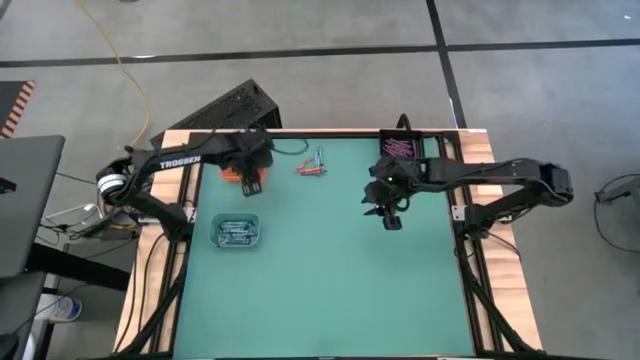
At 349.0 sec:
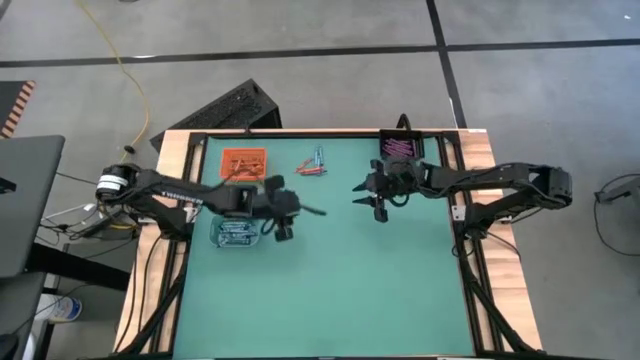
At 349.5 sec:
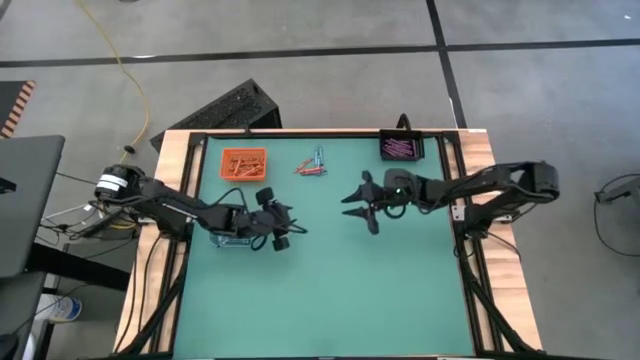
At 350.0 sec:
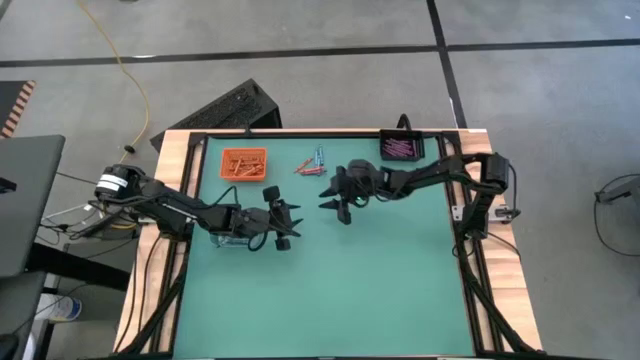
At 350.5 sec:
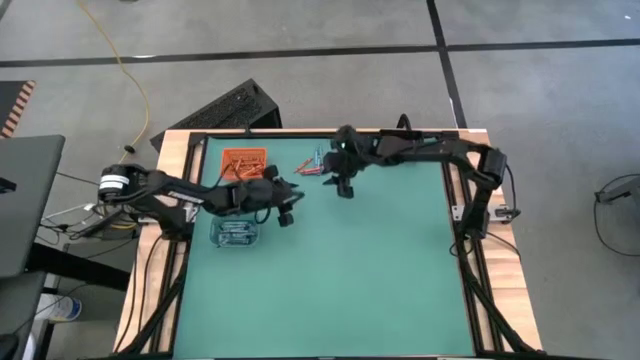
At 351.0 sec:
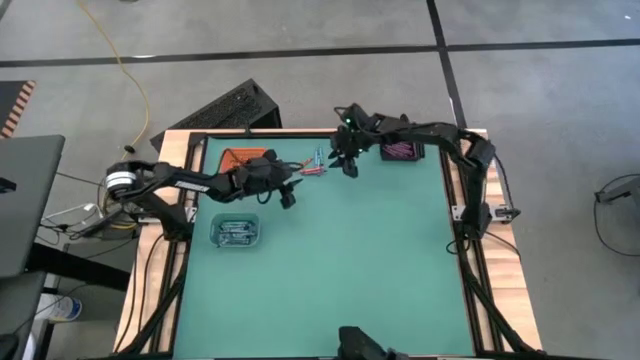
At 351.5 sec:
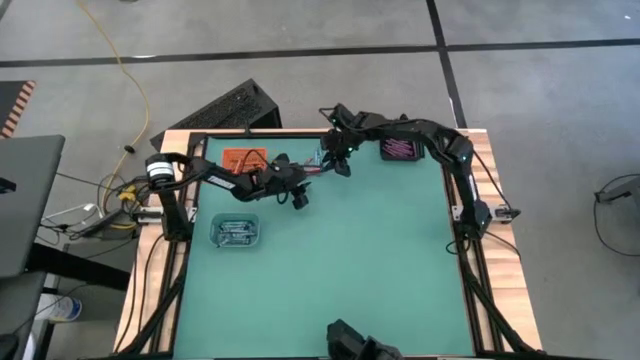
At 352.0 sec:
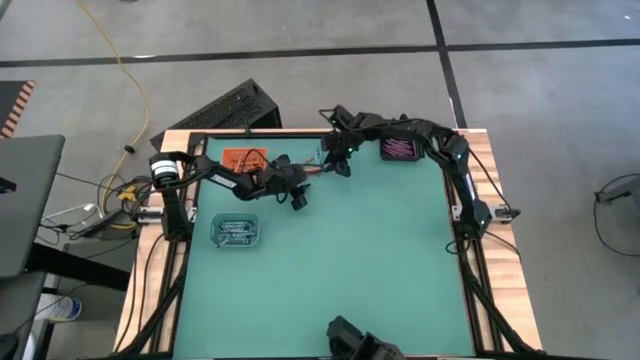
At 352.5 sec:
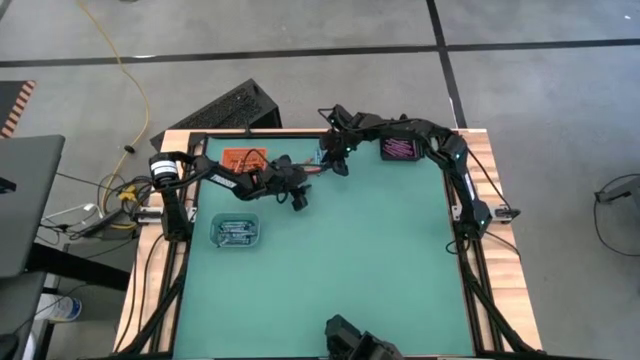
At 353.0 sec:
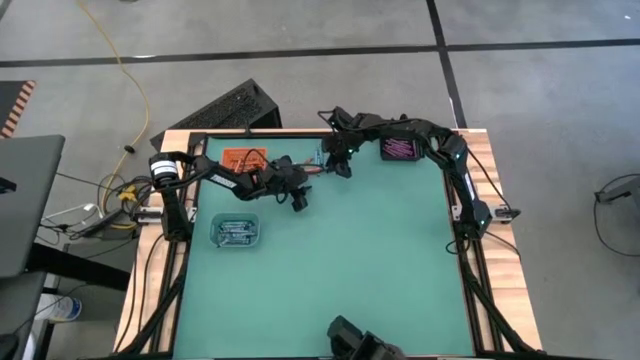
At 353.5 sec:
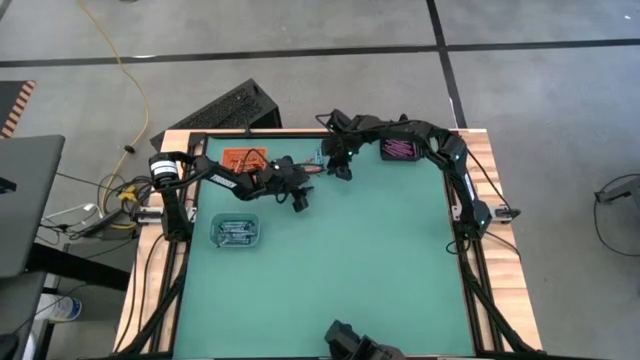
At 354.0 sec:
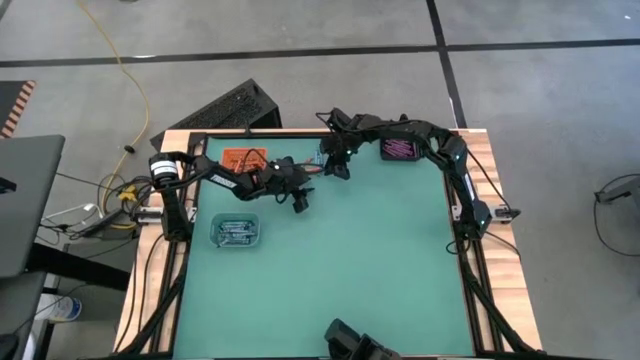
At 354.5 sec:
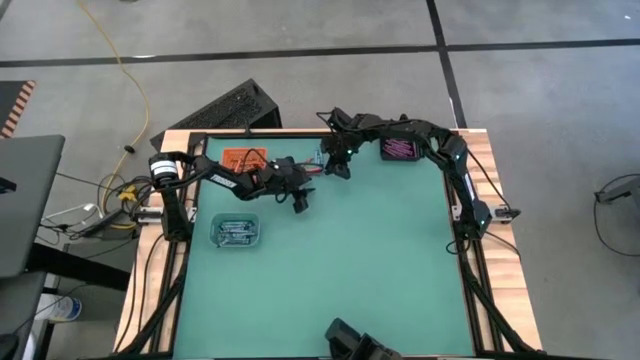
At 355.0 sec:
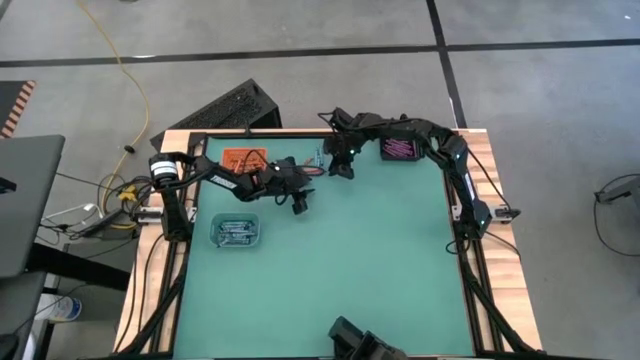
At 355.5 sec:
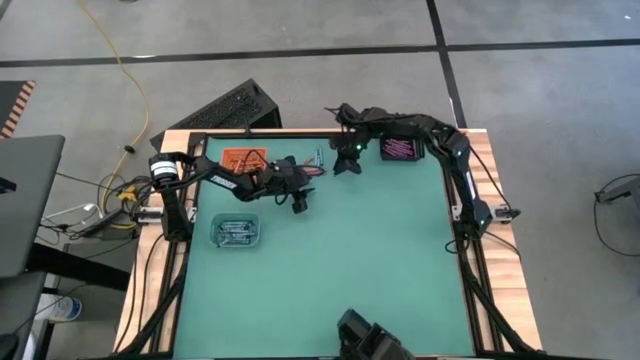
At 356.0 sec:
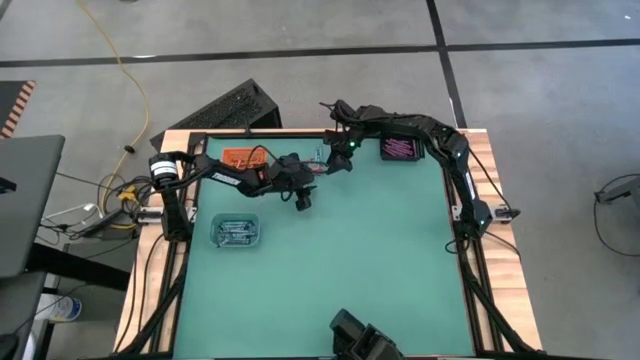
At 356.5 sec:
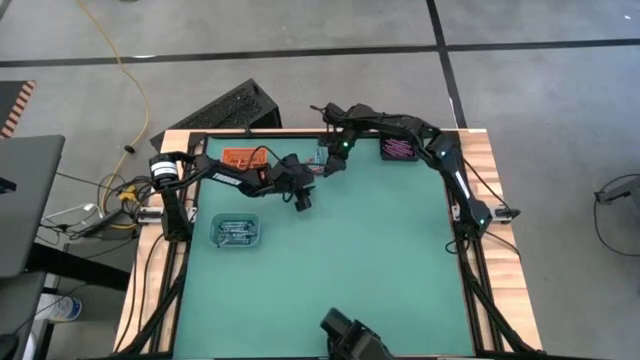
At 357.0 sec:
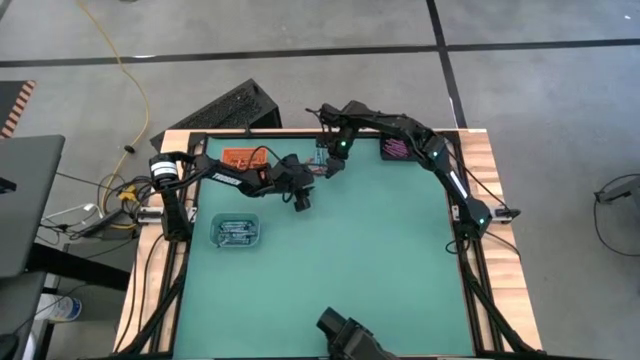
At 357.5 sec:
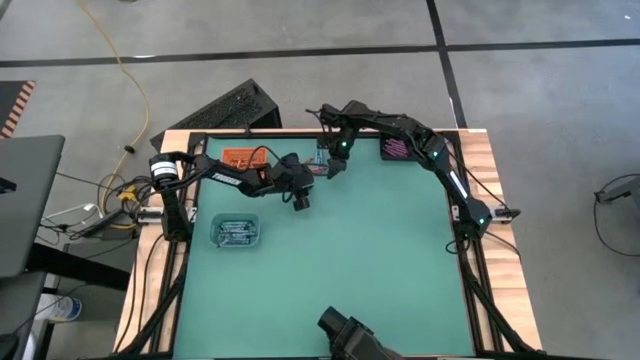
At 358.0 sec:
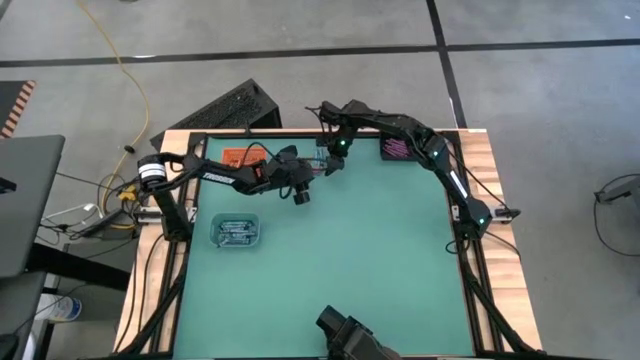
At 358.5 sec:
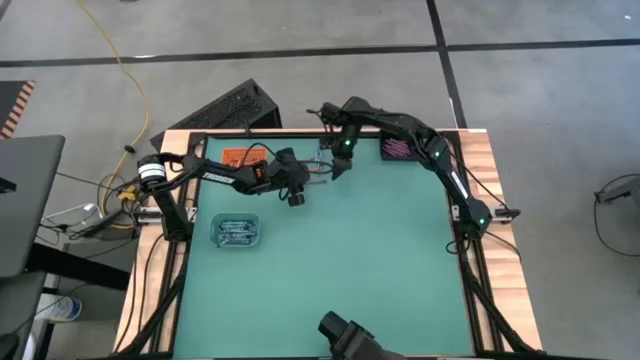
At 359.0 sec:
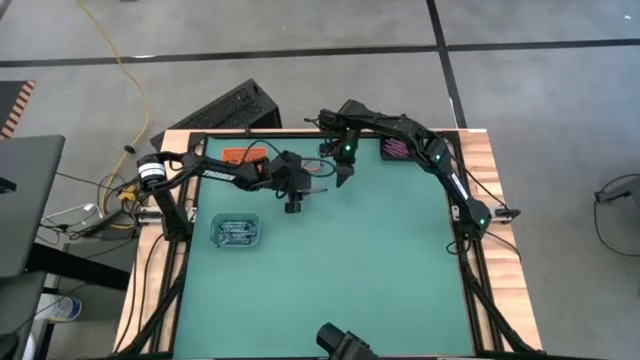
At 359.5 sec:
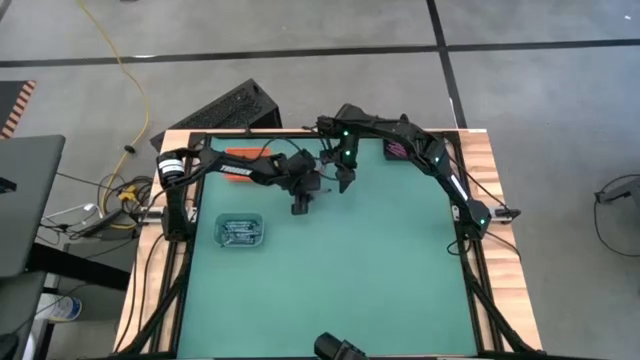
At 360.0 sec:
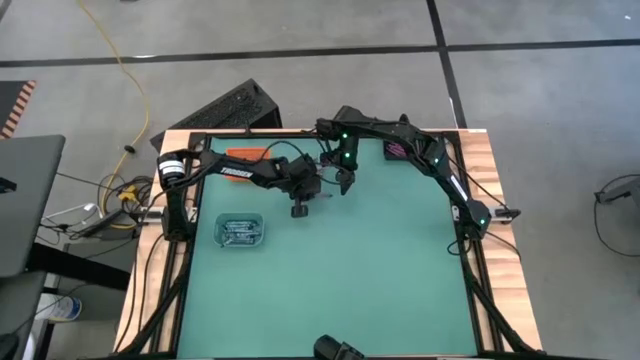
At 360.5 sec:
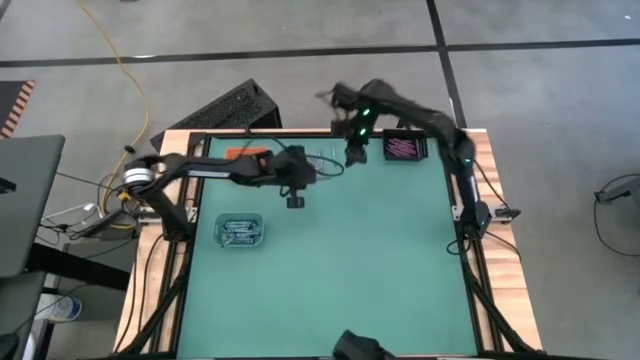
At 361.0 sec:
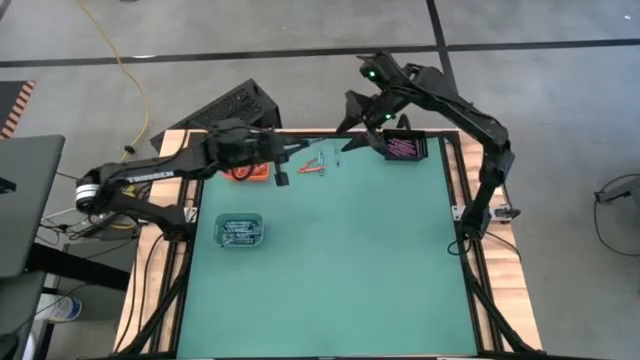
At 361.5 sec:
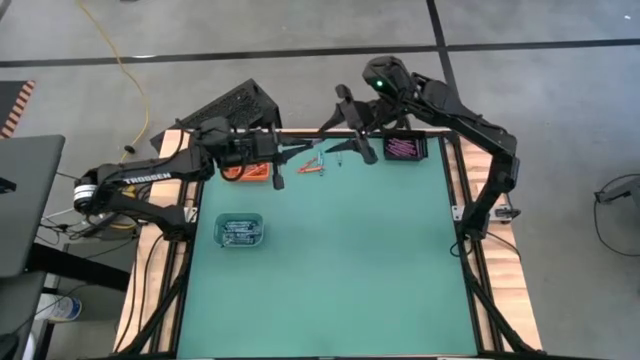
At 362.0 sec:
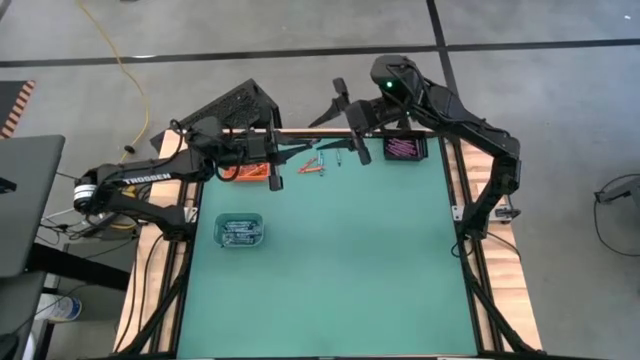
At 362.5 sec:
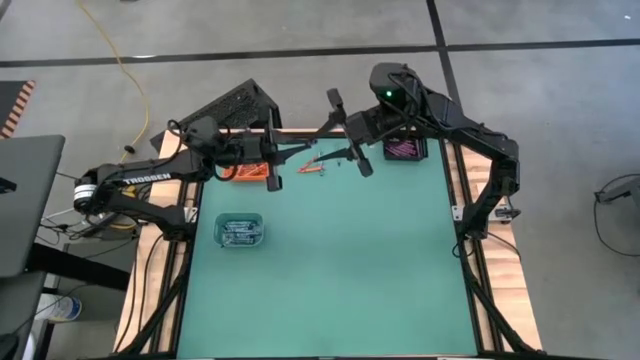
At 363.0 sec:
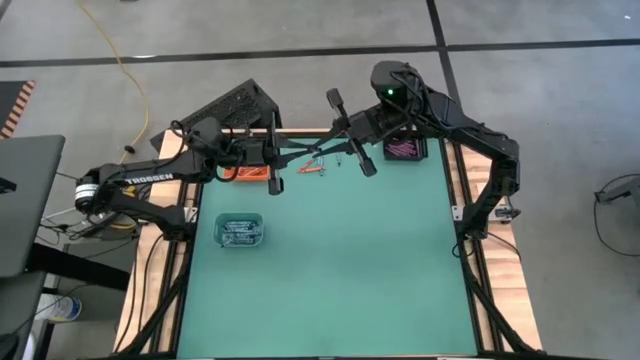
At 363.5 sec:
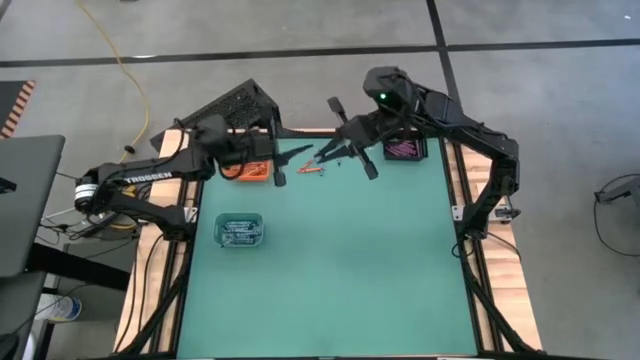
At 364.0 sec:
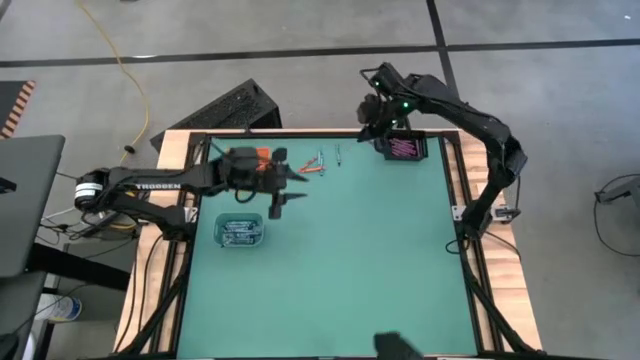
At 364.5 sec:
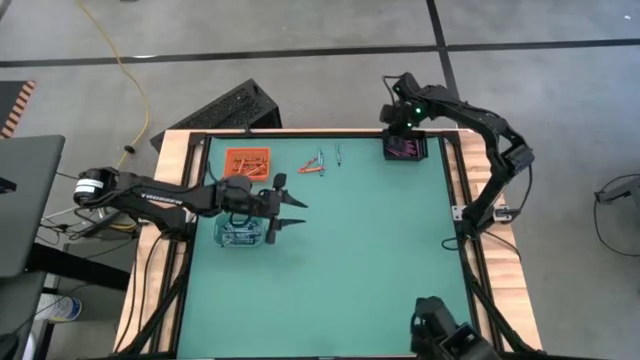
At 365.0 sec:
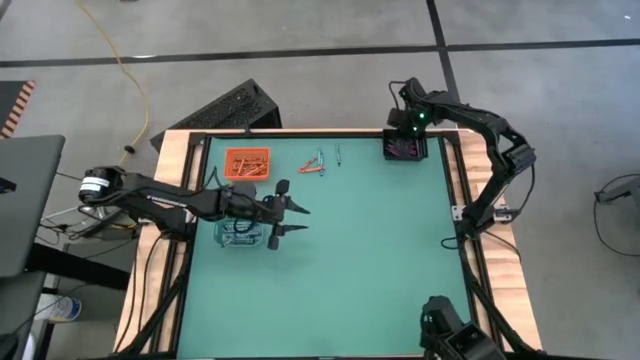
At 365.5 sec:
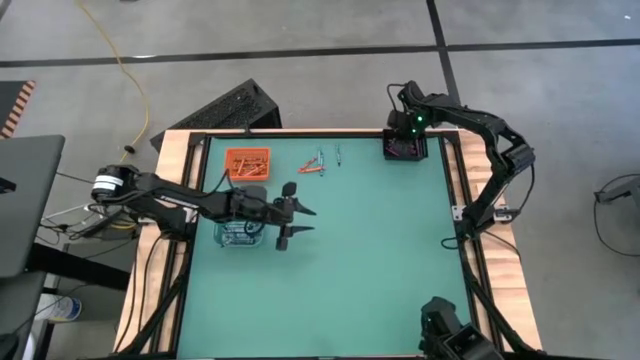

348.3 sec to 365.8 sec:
Task: Sort crayons
Put the purple crayon into the black basket

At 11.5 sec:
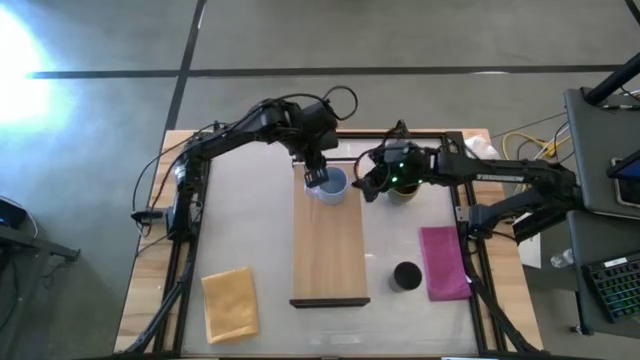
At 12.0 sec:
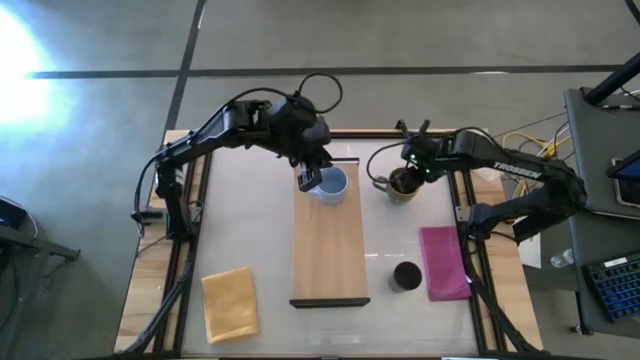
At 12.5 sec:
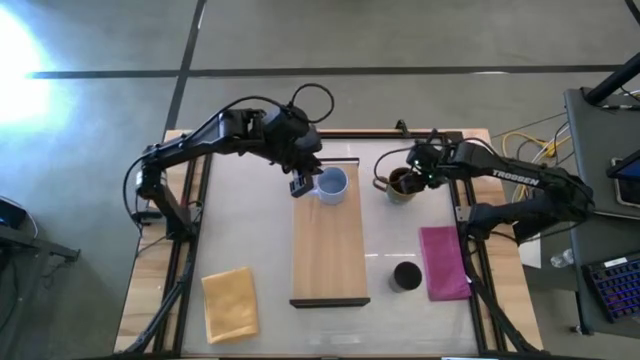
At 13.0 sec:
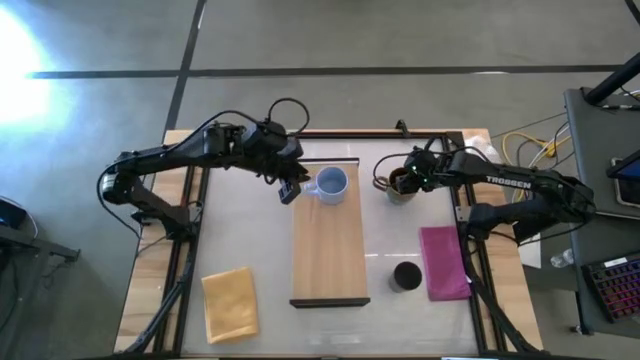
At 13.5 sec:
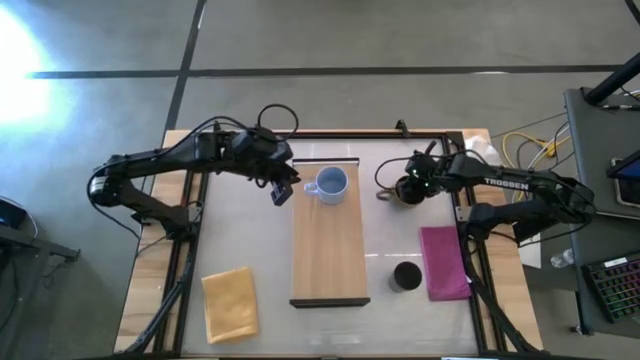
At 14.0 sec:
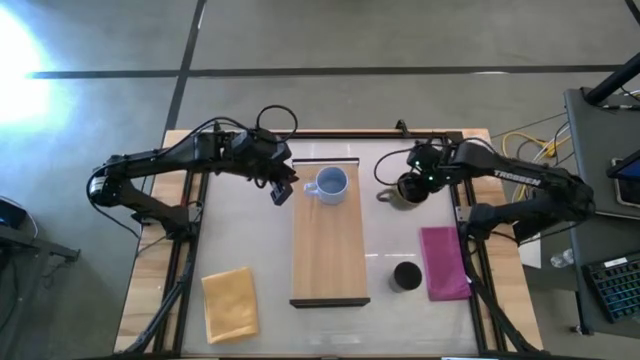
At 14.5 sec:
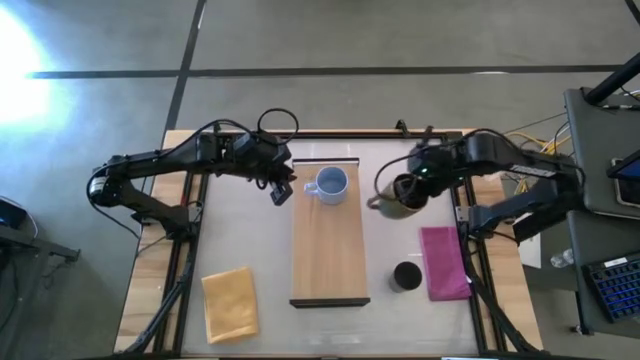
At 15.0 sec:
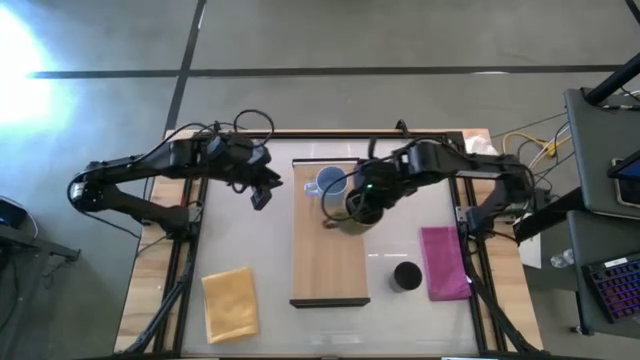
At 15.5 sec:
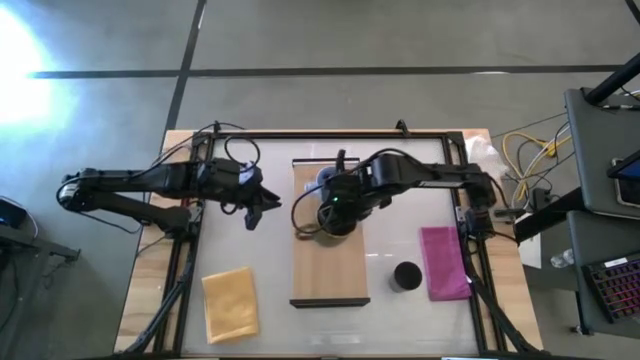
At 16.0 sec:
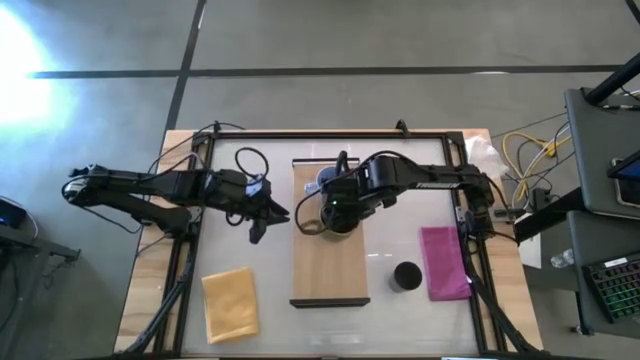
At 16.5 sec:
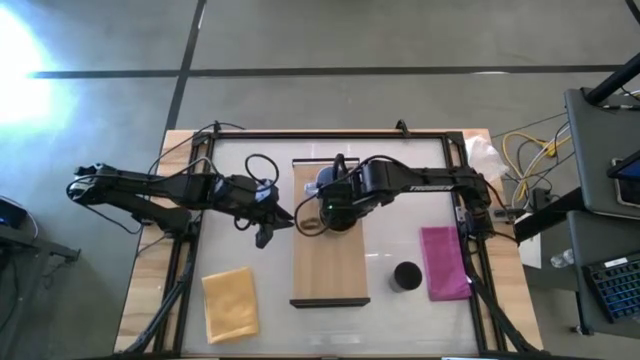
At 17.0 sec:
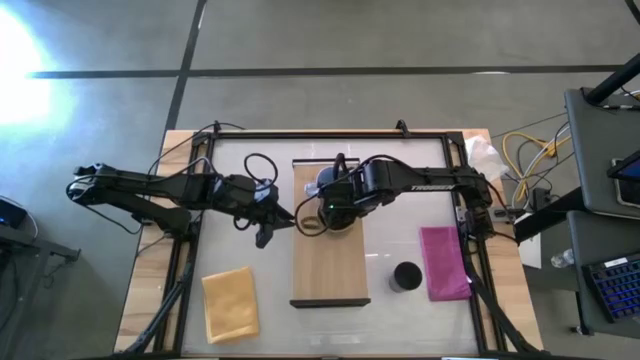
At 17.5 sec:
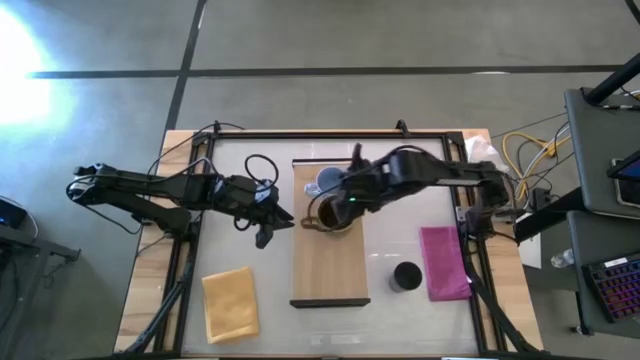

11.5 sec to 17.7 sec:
Task: Stack small to large cups/mugs on shelf
Put the green mug on the shelf
